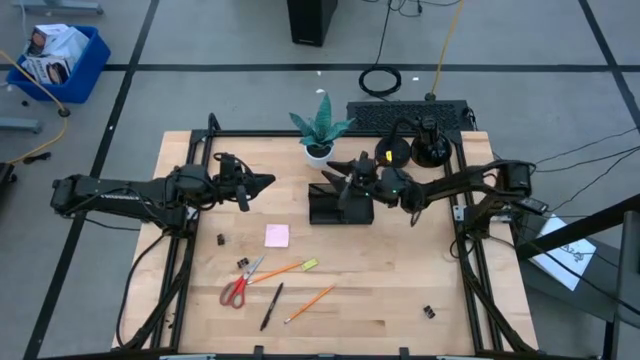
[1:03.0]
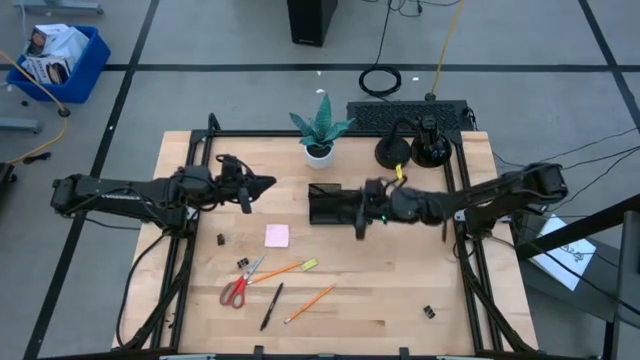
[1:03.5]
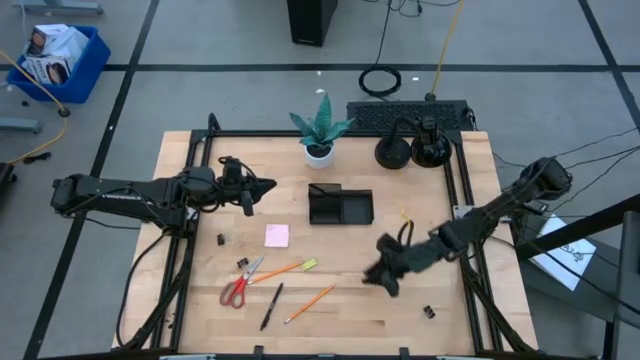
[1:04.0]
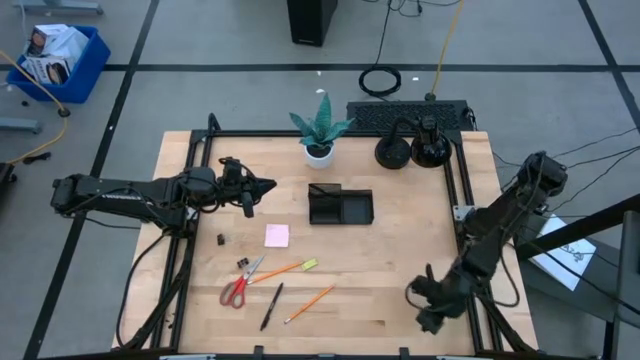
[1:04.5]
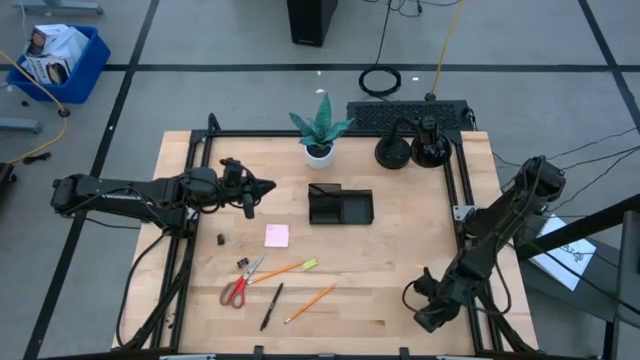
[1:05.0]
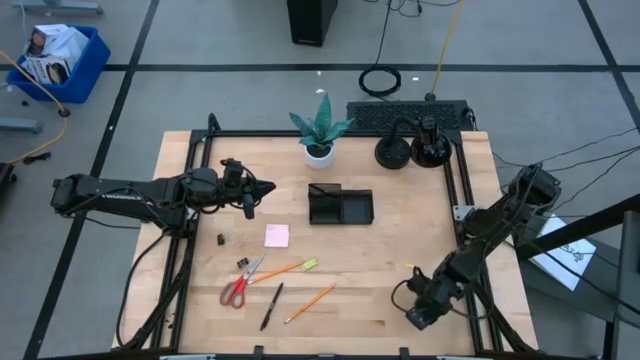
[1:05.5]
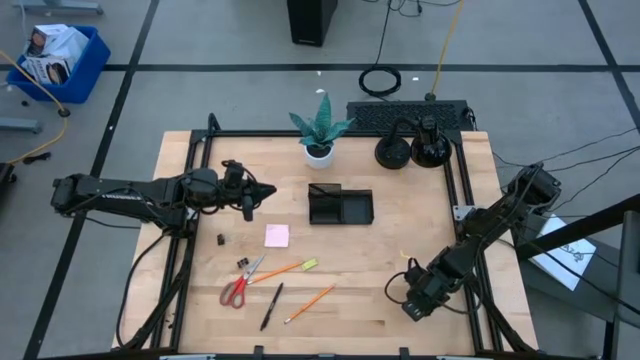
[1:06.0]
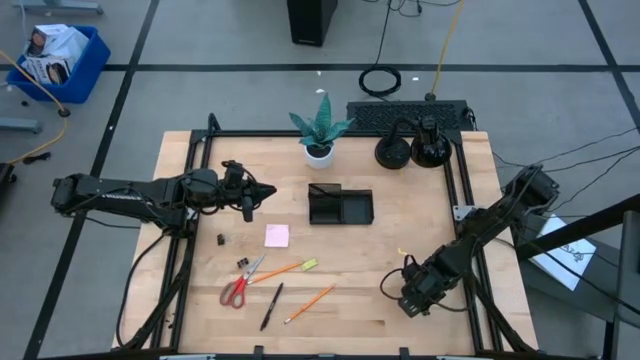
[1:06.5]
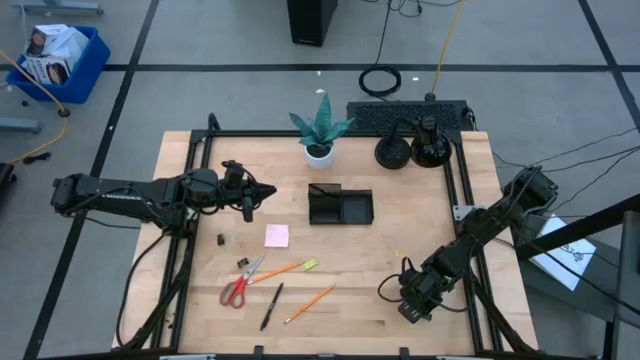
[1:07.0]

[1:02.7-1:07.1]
Task: Pick and place office supplies into organizer
Put the black binder clip into the black desk organizer

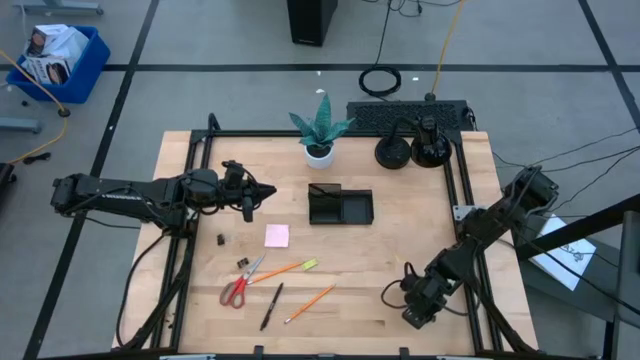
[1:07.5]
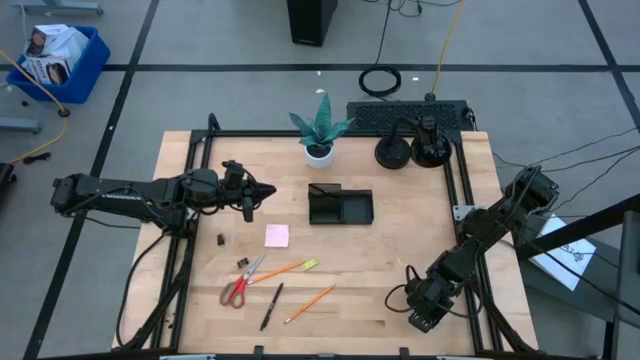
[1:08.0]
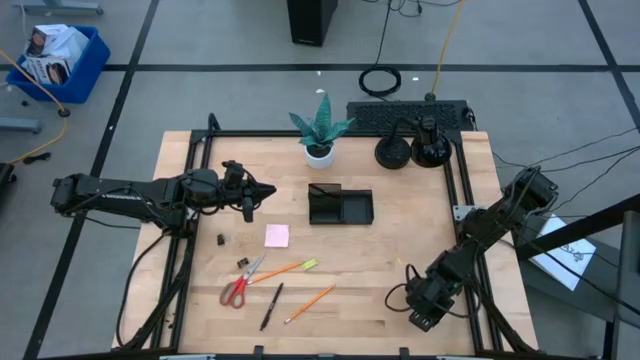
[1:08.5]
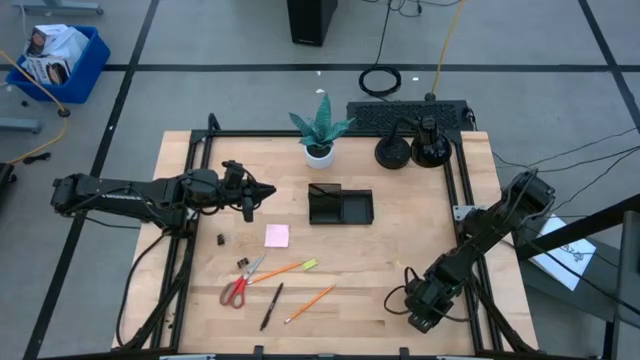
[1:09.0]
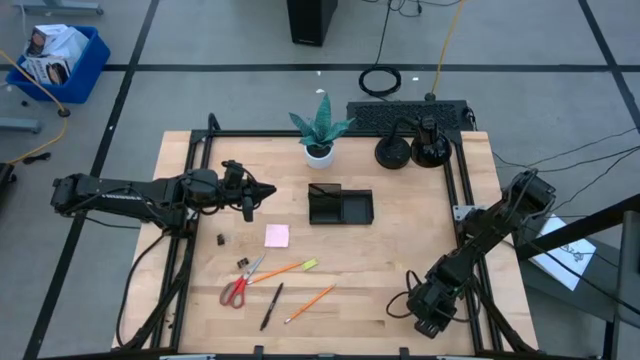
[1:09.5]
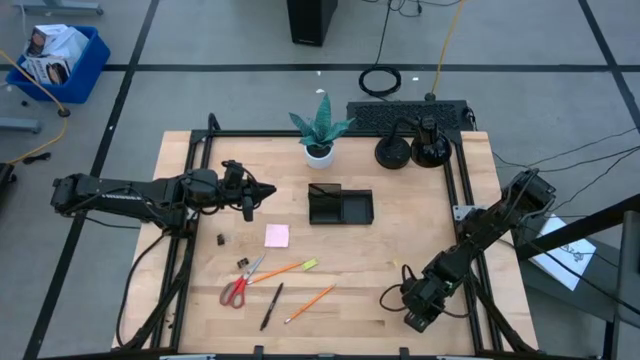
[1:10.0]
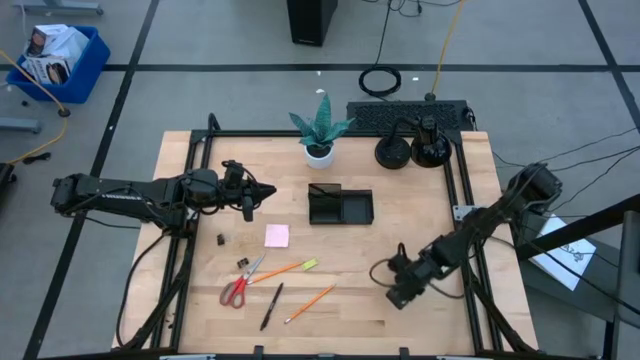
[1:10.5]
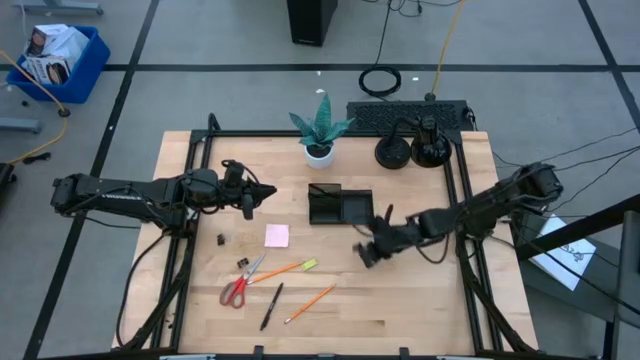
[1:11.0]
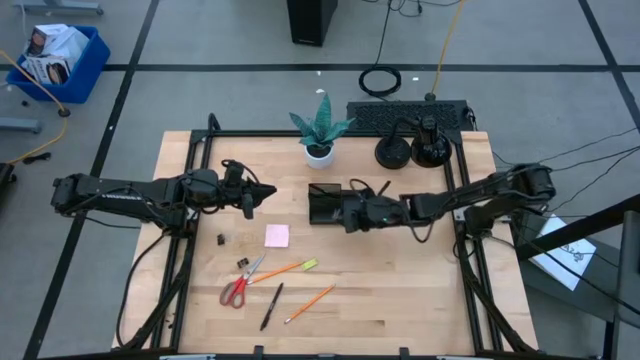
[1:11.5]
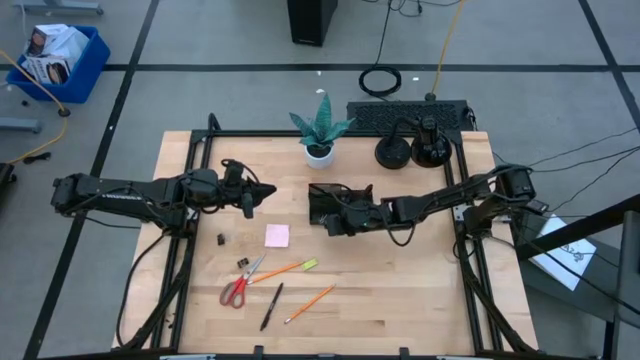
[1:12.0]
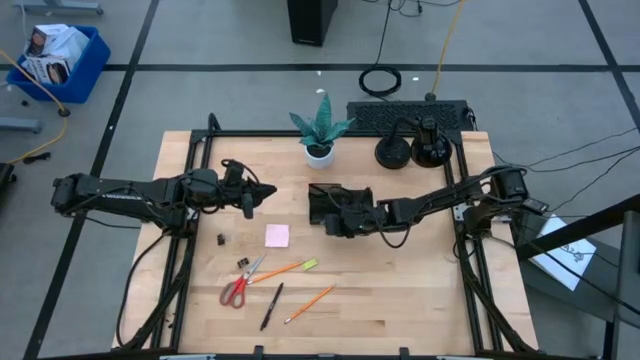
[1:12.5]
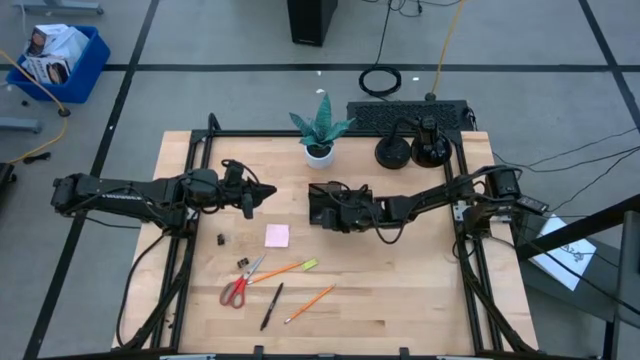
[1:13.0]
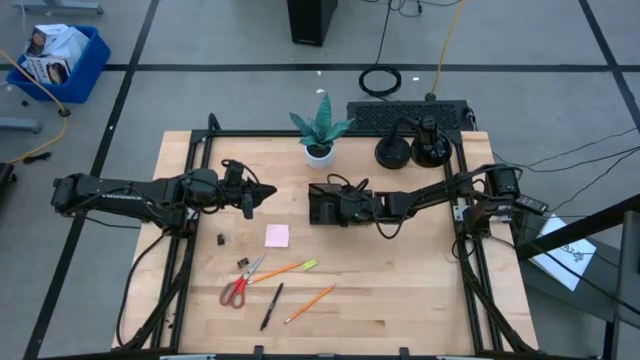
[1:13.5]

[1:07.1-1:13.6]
Put the black binder clip into the black desk organizer

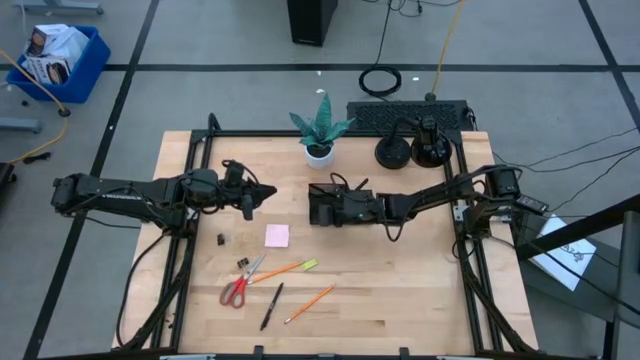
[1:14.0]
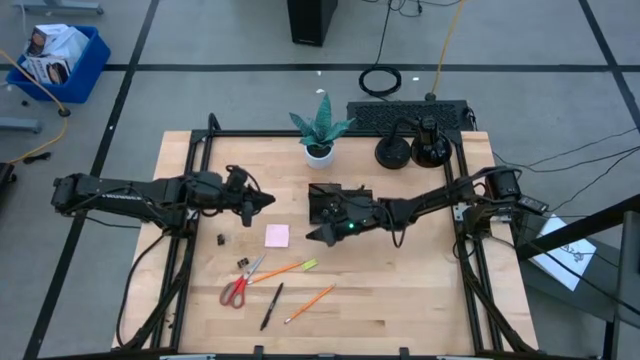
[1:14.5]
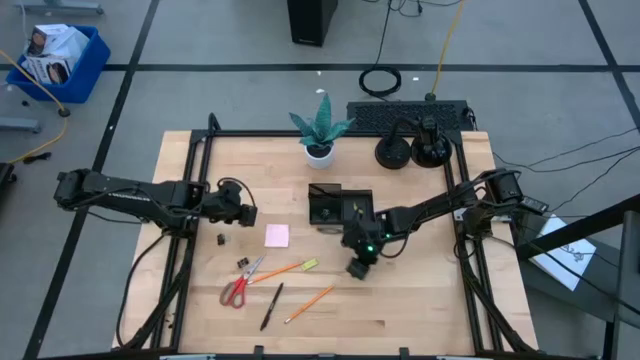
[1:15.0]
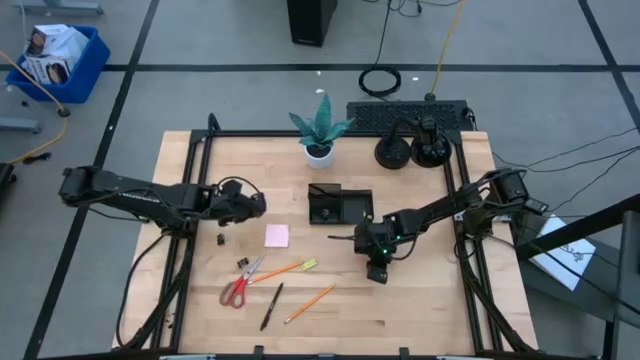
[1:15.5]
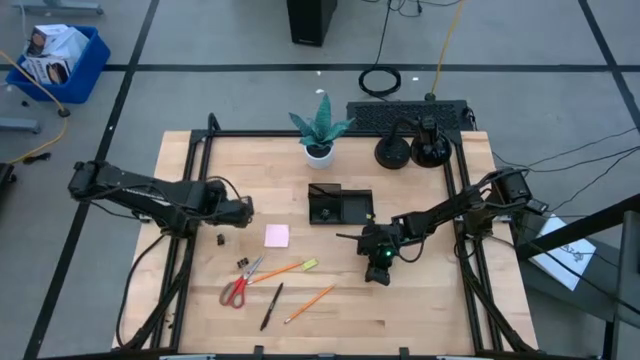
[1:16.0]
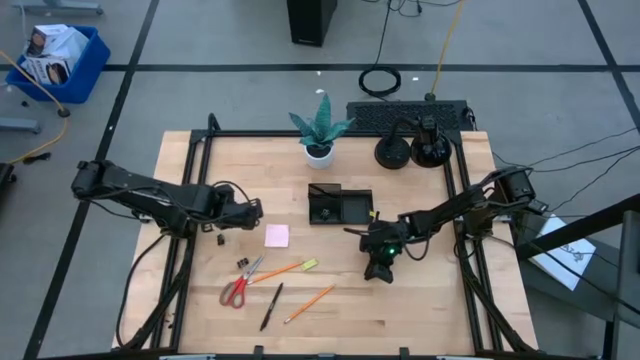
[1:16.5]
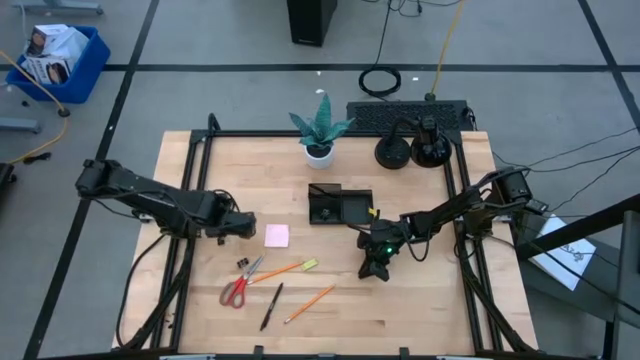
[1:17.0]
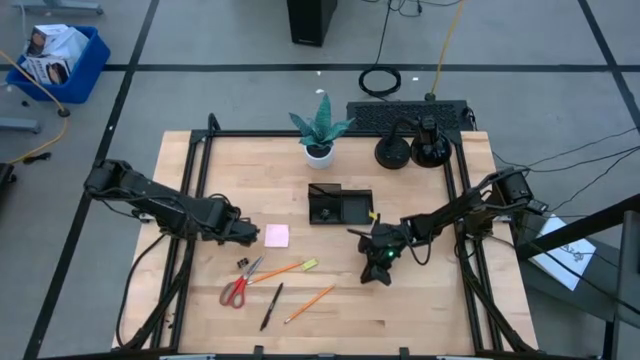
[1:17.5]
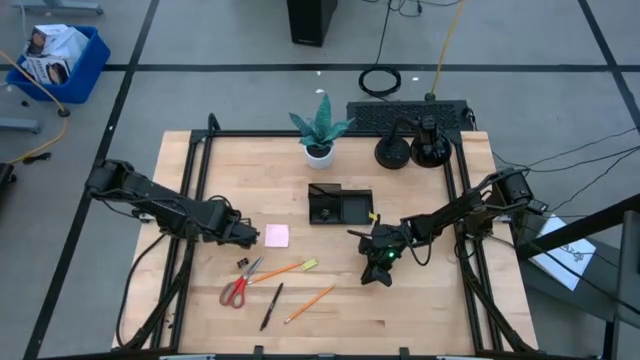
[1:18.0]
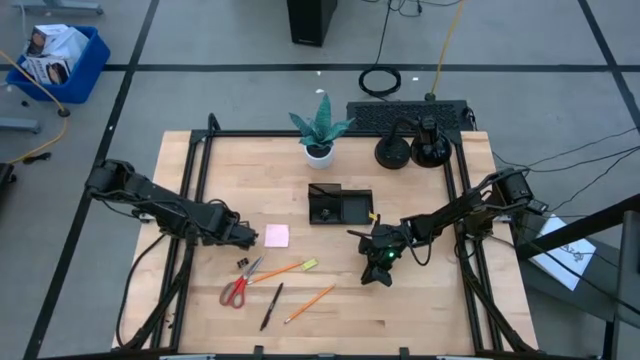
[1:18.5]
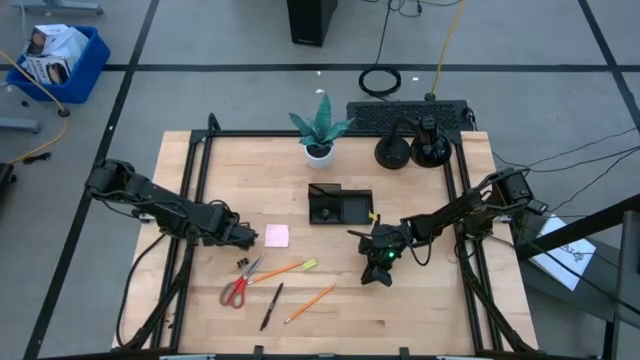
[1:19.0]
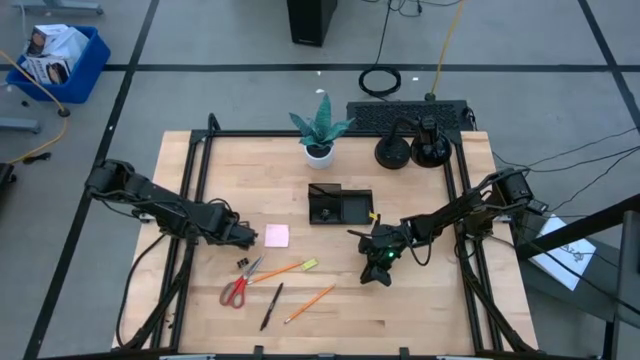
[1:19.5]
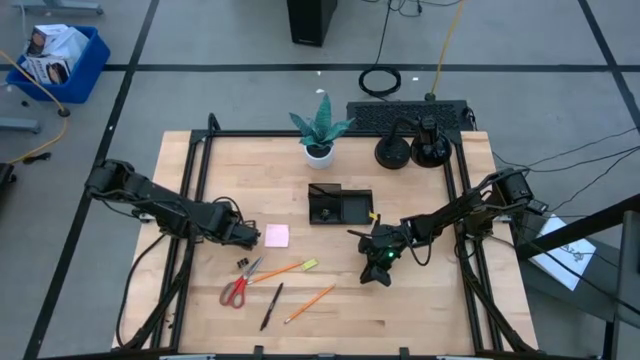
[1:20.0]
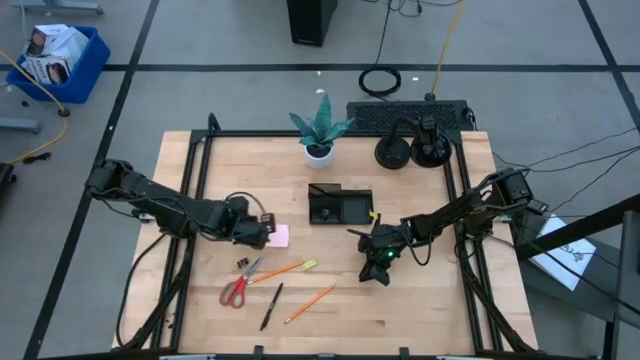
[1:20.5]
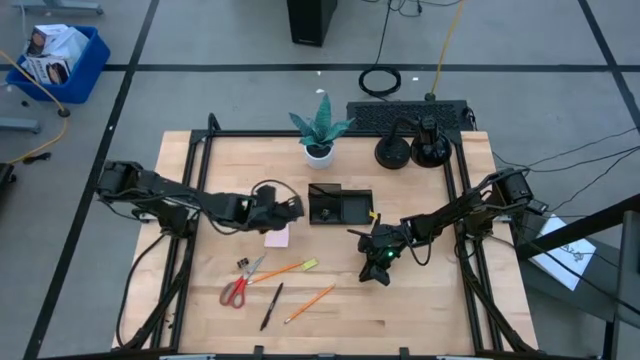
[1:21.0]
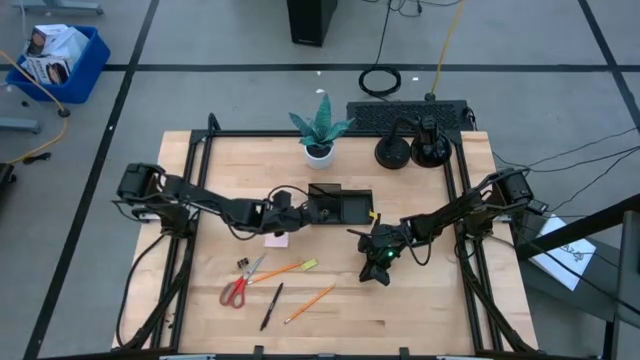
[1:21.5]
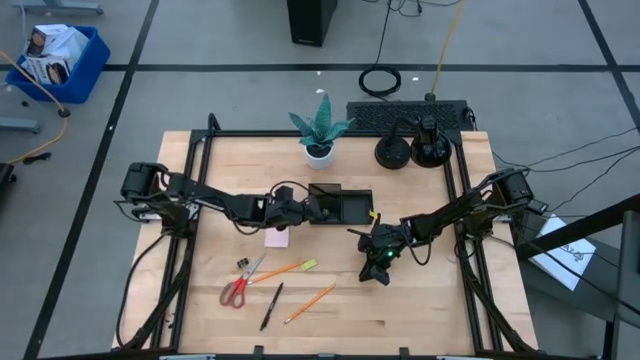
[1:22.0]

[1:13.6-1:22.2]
Put the black binder clip into the black desk organizer
